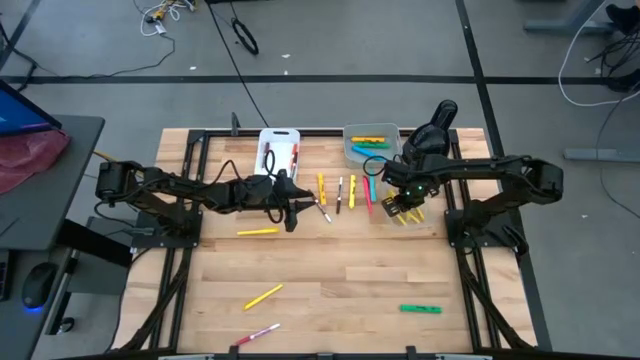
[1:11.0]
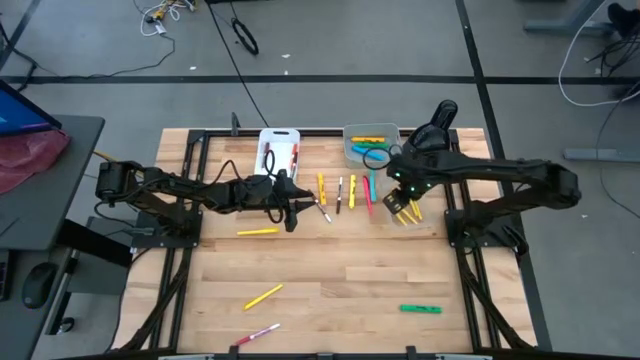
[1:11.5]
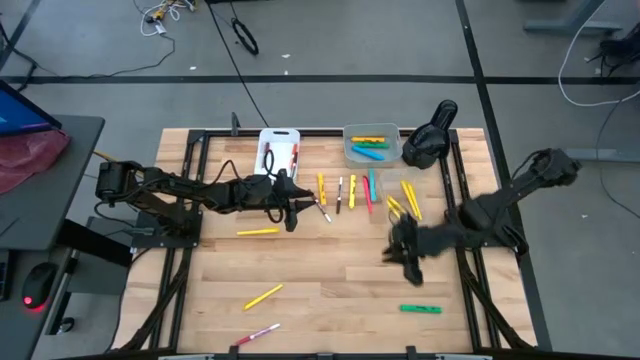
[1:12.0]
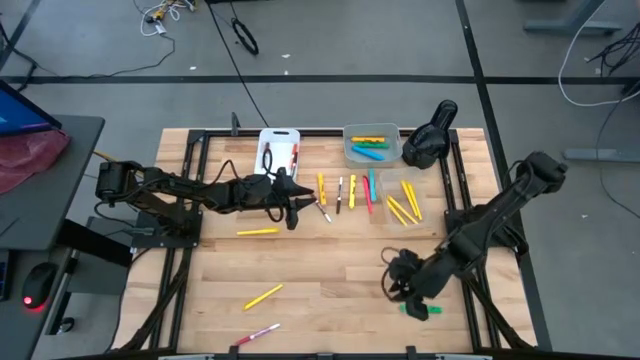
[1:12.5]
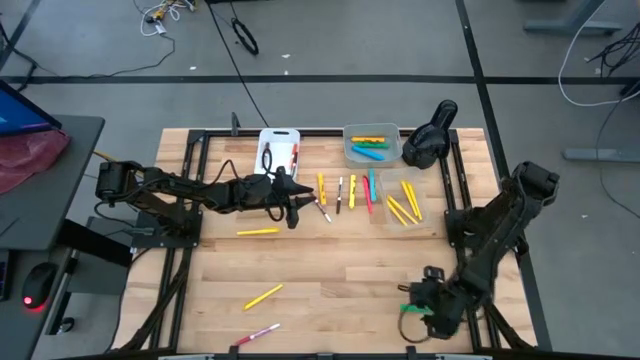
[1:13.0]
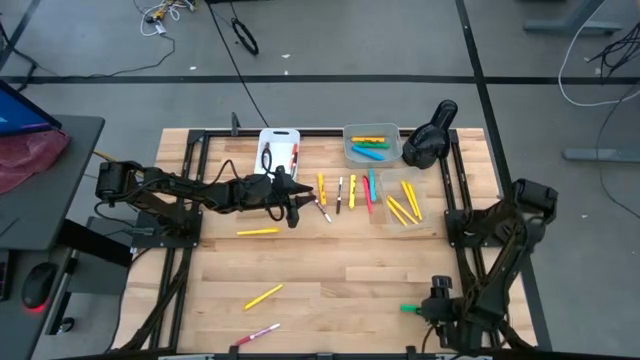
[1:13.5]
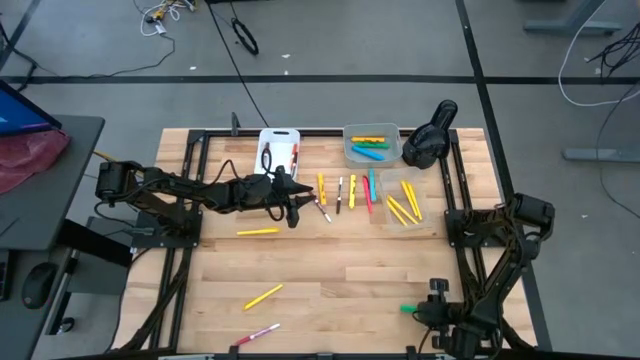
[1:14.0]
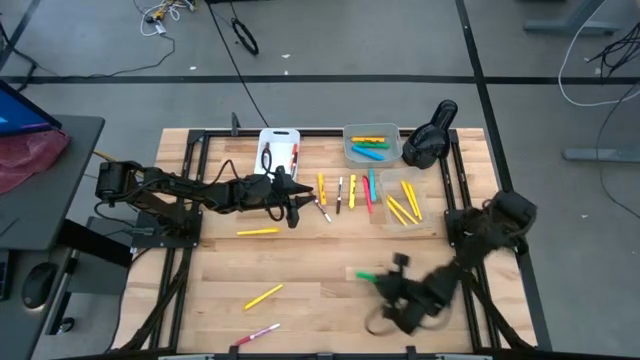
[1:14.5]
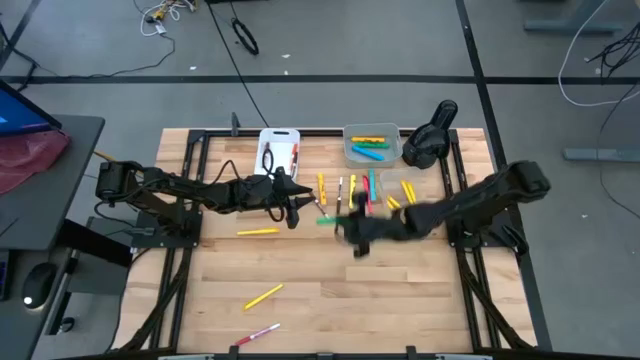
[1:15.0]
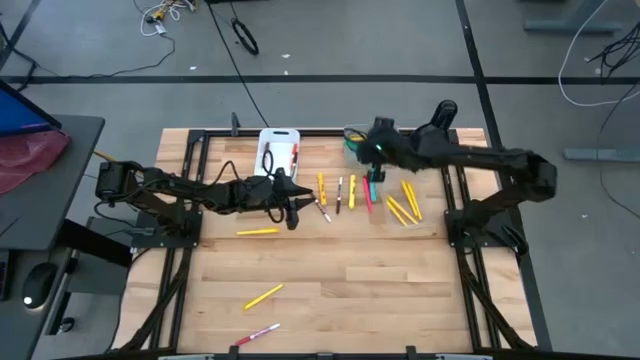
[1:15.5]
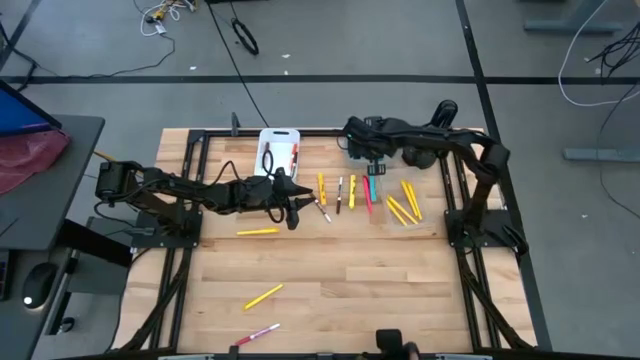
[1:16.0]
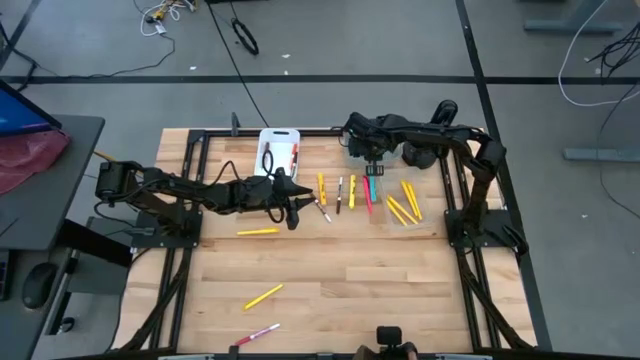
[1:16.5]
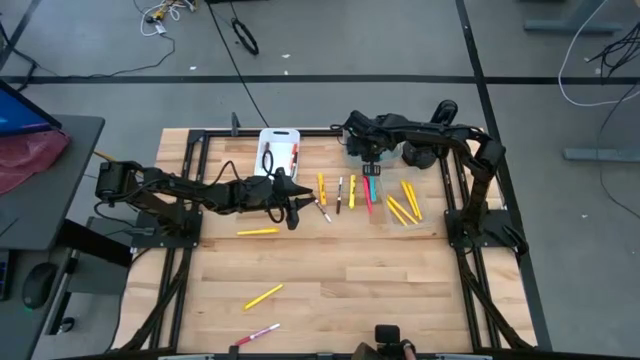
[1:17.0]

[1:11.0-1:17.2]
Task: Pick & Place Markers
Put the green highlighter pen into the gray bin

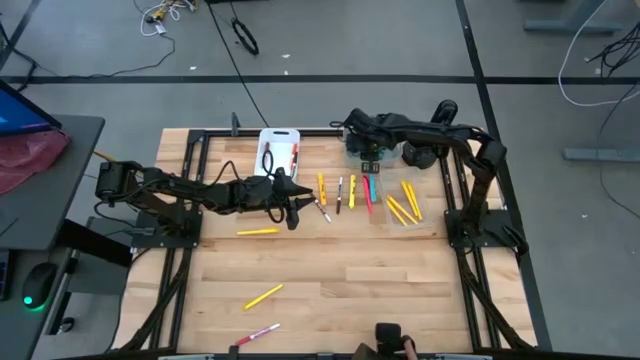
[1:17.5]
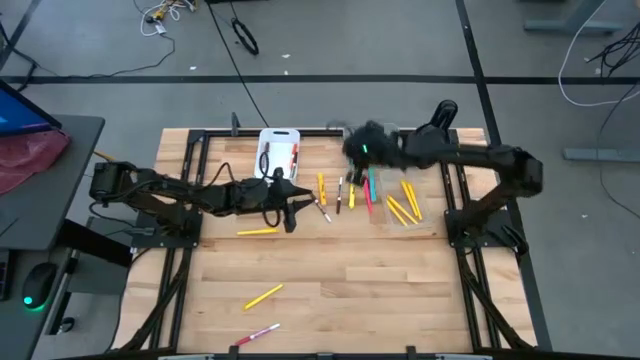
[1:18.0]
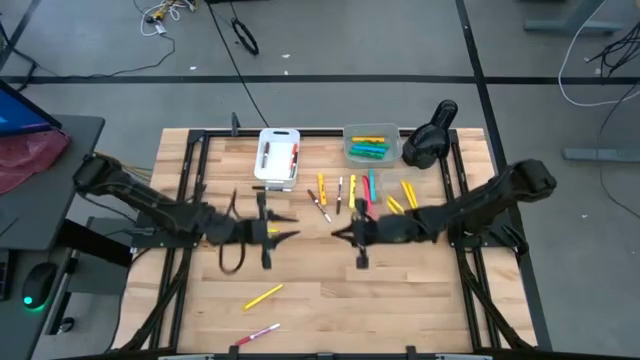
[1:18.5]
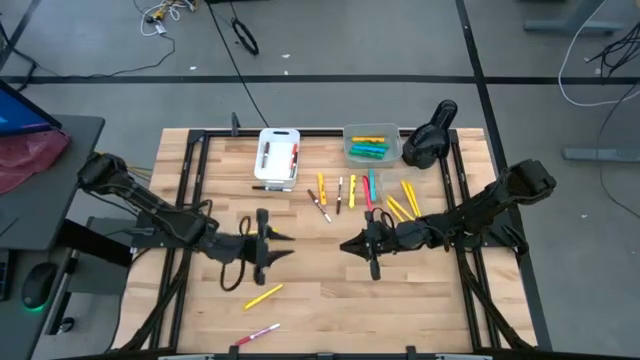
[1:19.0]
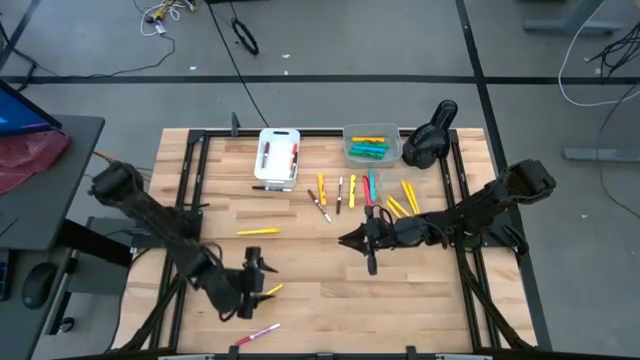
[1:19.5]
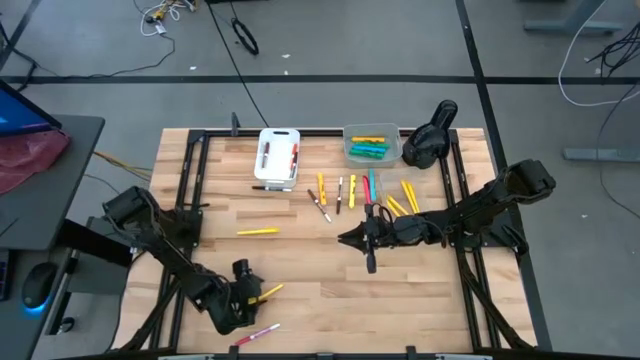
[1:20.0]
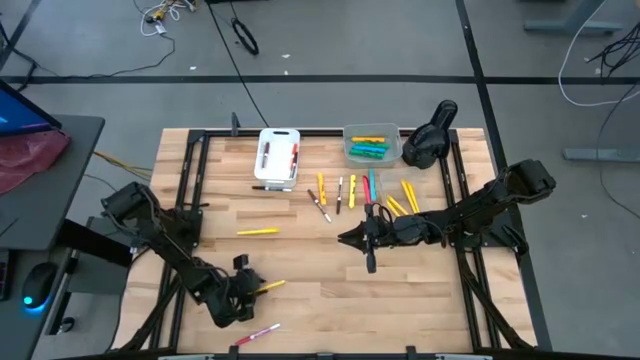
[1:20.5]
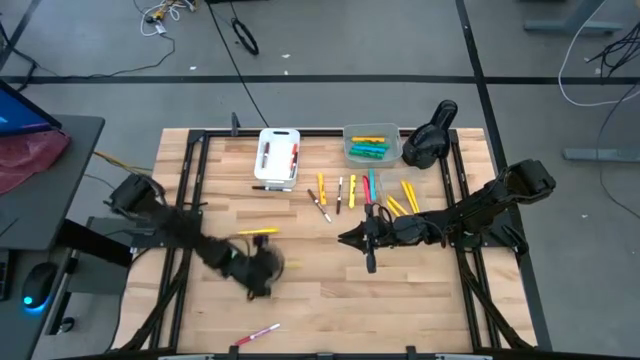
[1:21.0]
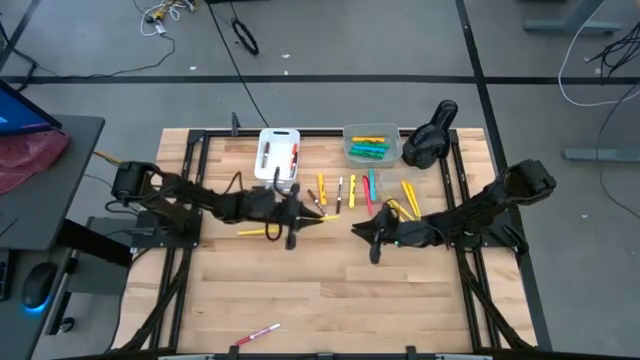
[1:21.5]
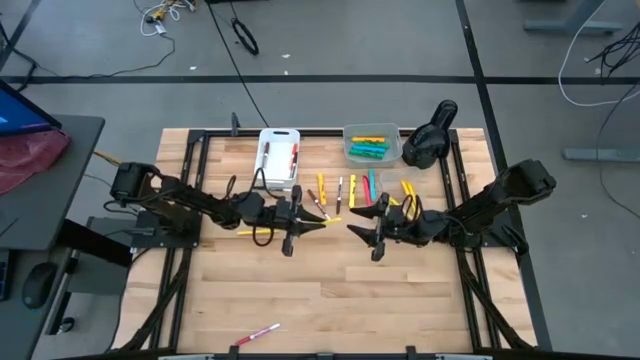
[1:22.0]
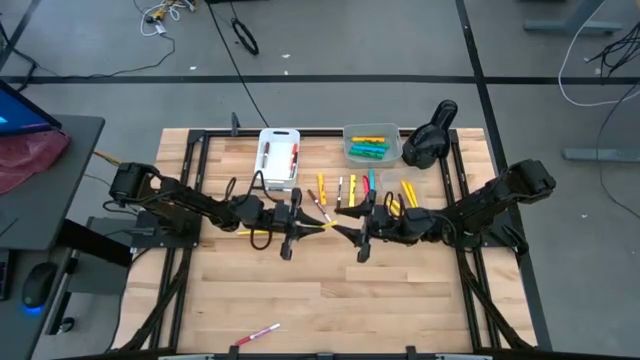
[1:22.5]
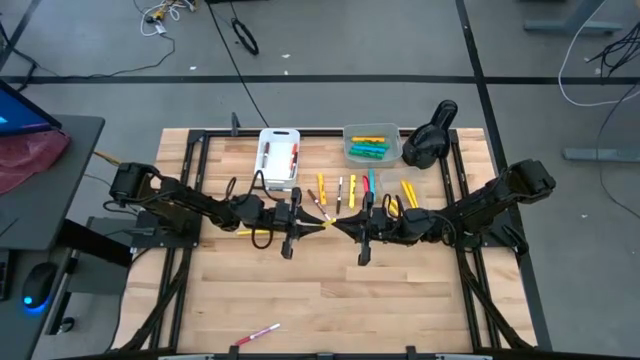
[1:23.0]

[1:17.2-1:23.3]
Put the yellow pen into the transparent bin

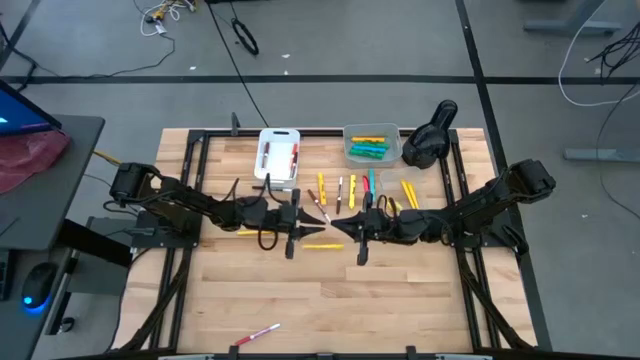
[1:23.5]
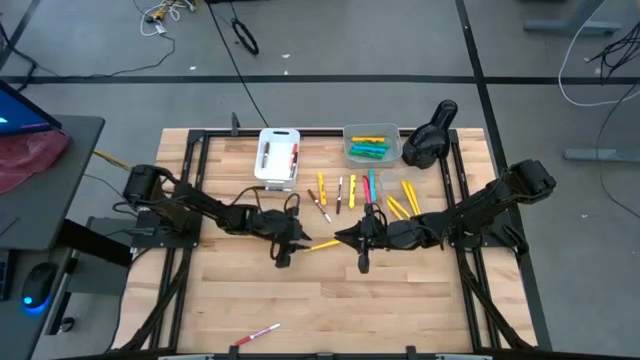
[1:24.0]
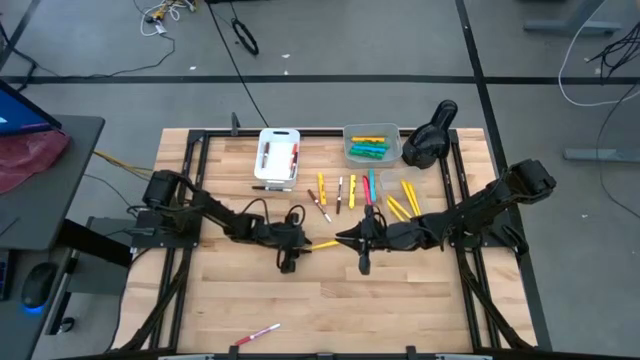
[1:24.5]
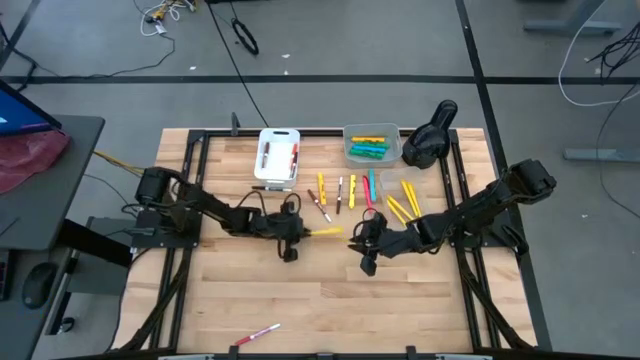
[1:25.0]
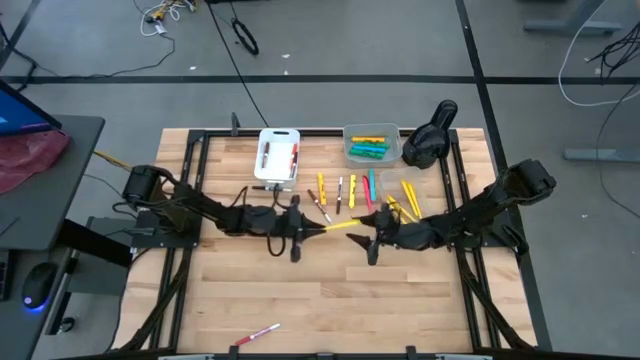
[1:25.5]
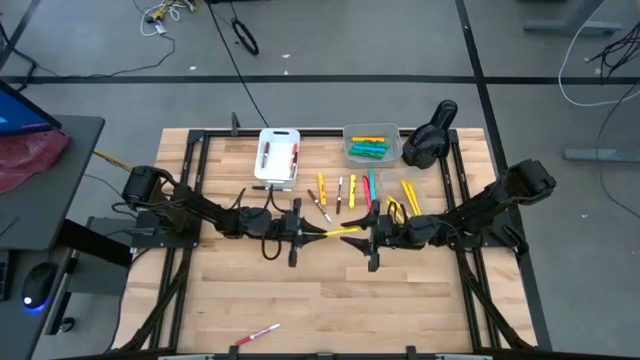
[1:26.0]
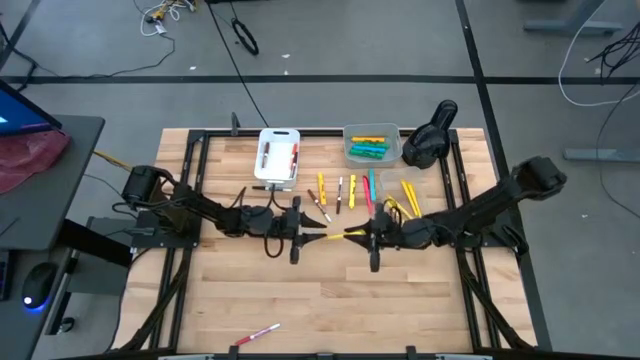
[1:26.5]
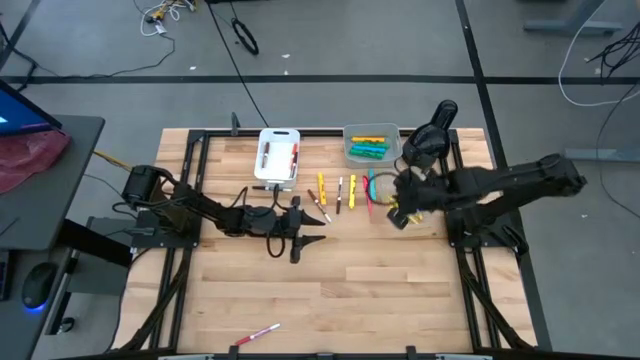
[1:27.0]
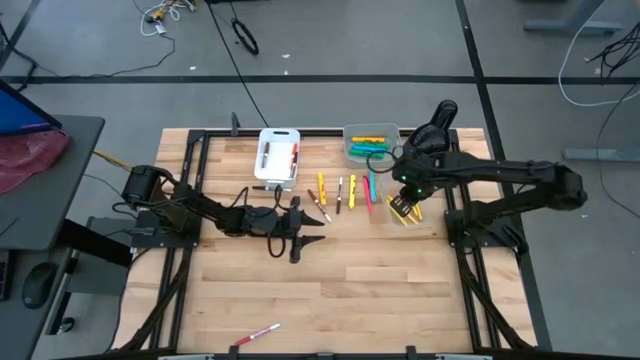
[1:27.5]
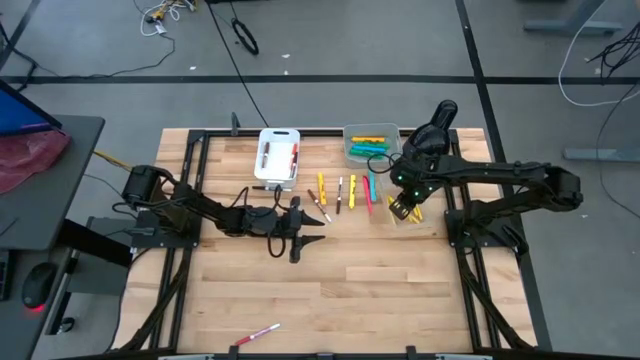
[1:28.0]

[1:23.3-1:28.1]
Put the yellow pen into the transparent bin

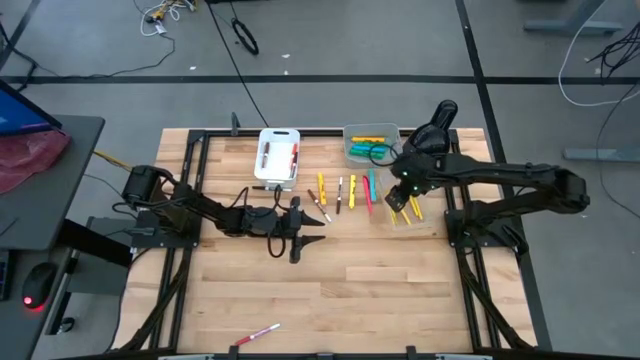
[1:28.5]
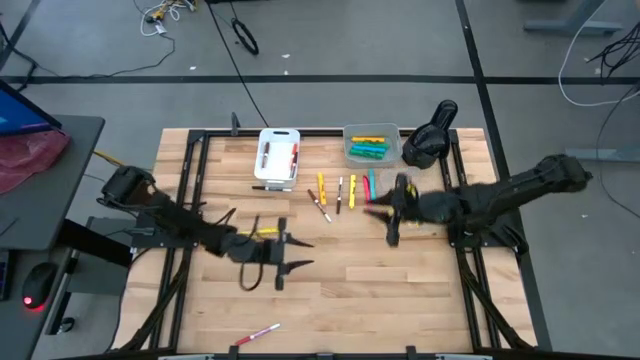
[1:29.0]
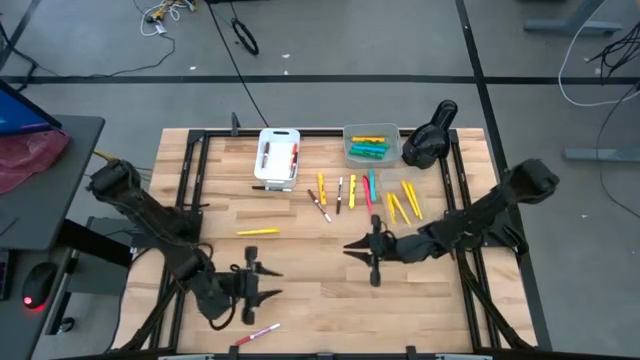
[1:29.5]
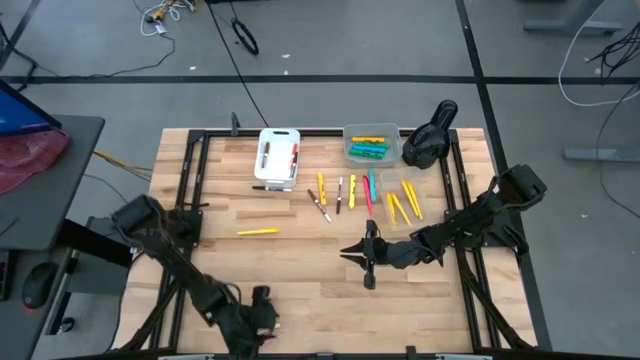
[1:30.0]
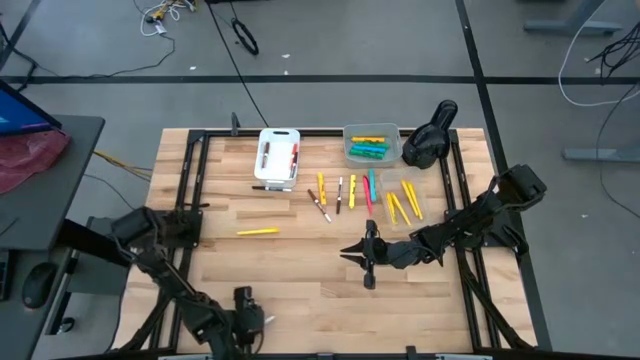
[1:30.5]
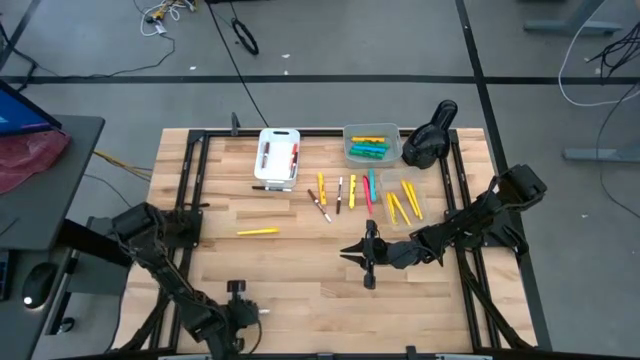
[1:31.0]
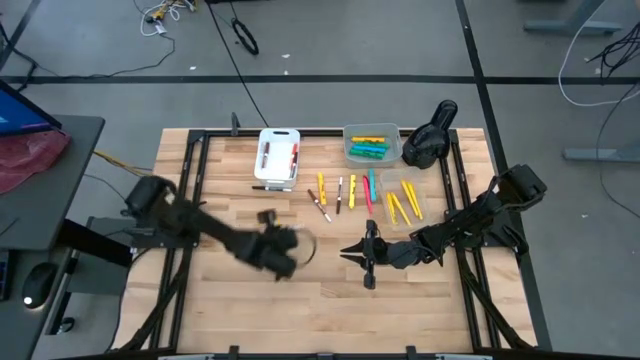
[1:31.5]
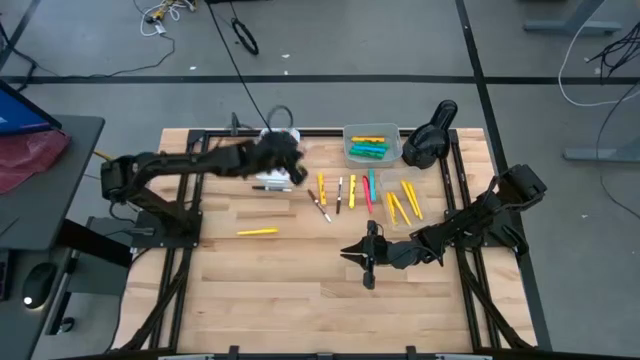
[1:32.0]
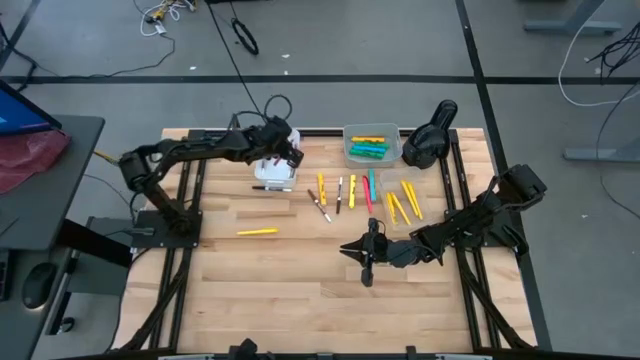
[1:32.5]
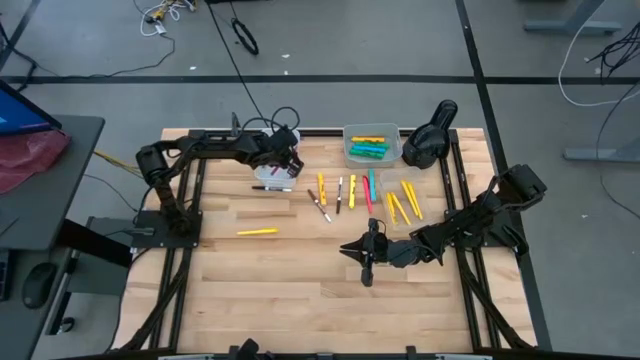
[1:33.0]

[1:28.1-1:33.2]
Put the pink marker pen into the white bin
